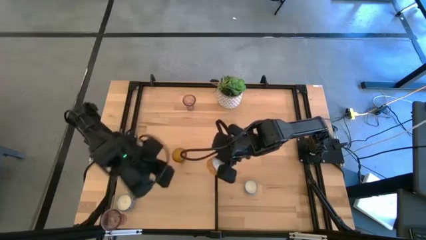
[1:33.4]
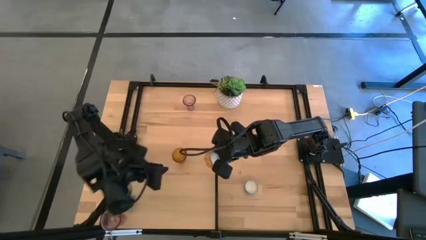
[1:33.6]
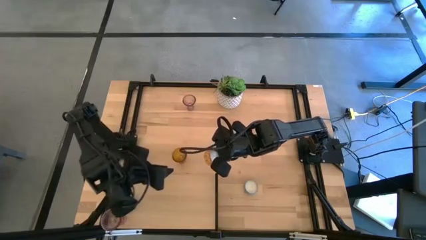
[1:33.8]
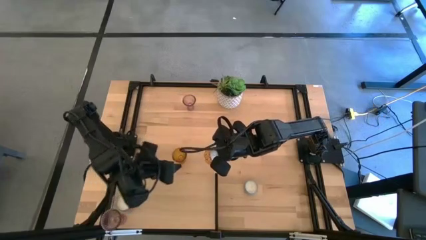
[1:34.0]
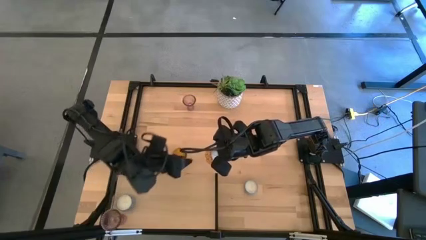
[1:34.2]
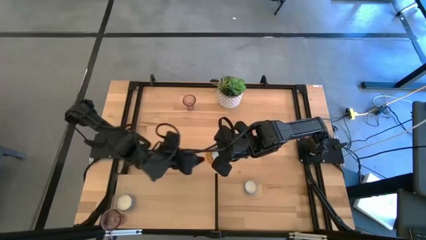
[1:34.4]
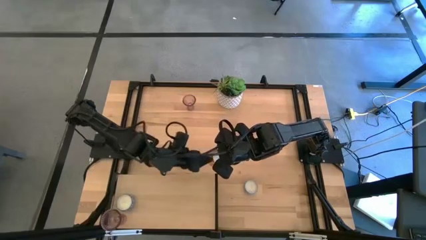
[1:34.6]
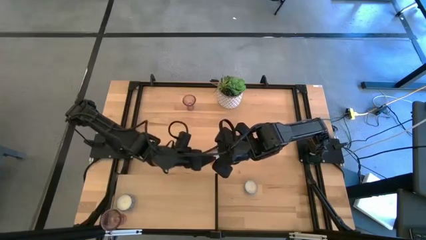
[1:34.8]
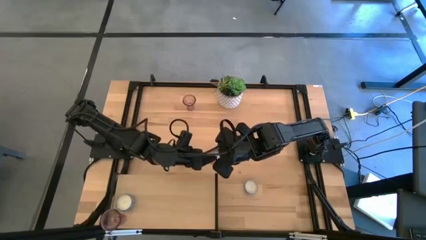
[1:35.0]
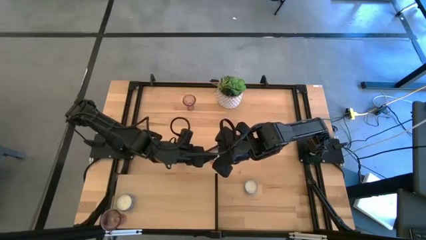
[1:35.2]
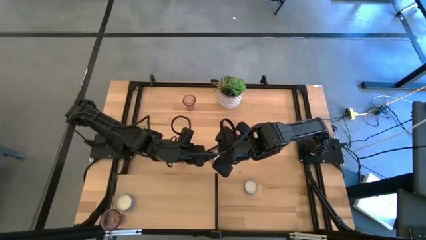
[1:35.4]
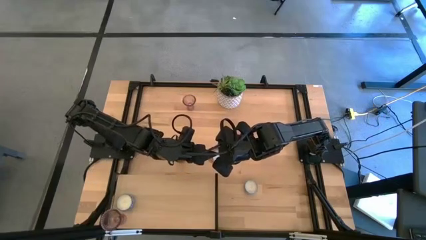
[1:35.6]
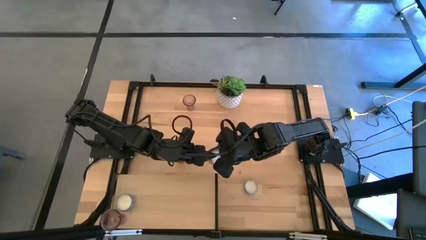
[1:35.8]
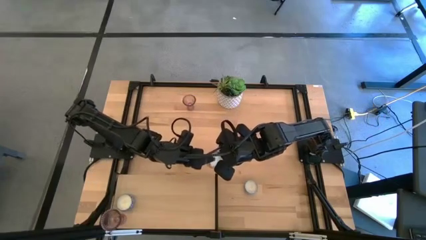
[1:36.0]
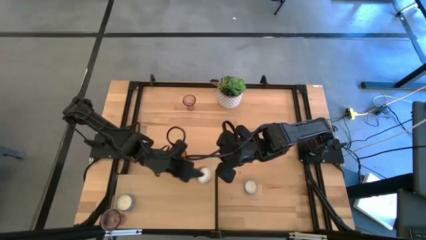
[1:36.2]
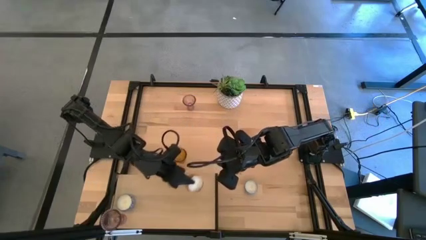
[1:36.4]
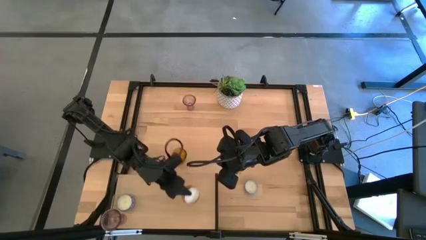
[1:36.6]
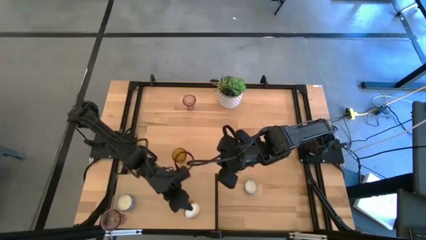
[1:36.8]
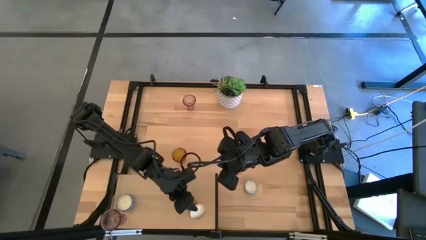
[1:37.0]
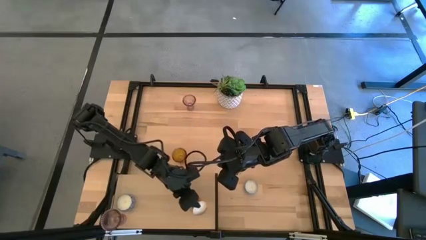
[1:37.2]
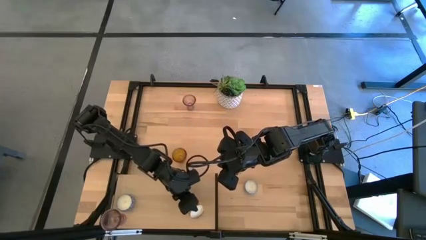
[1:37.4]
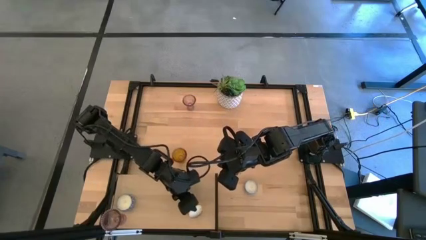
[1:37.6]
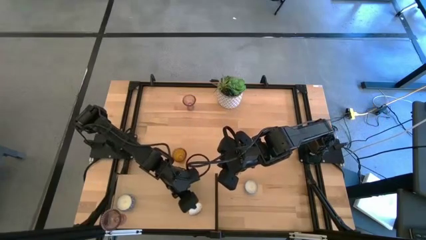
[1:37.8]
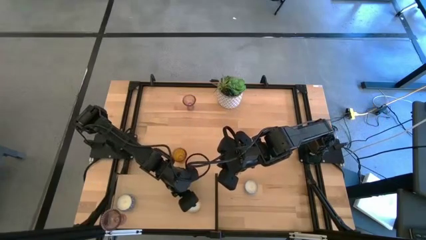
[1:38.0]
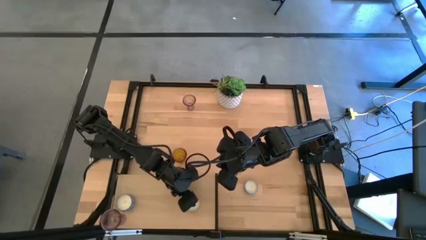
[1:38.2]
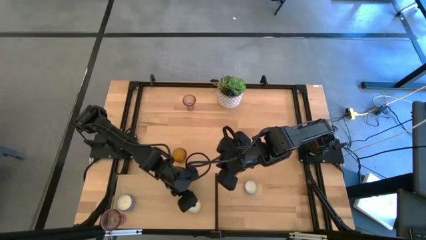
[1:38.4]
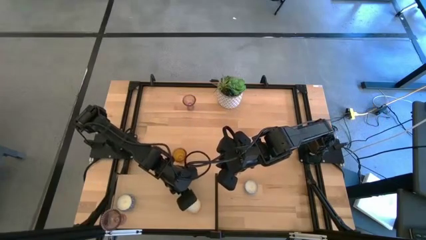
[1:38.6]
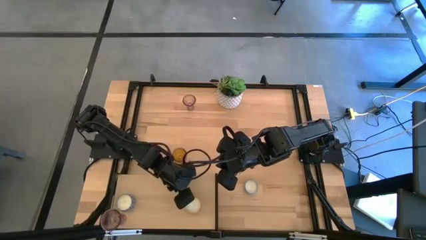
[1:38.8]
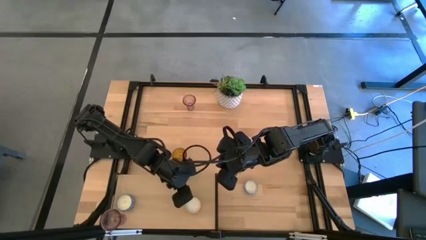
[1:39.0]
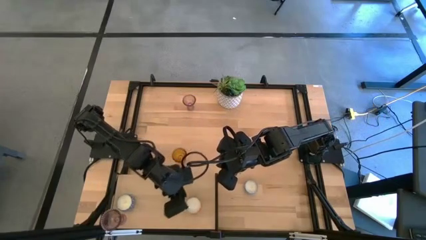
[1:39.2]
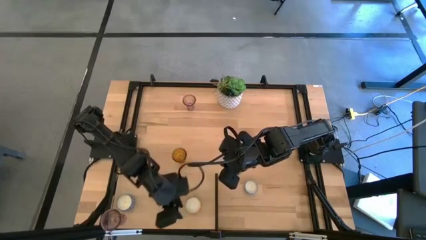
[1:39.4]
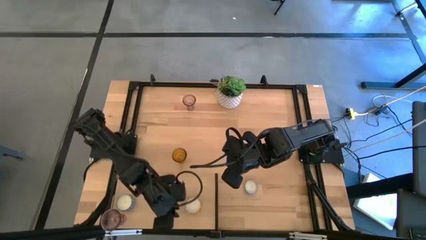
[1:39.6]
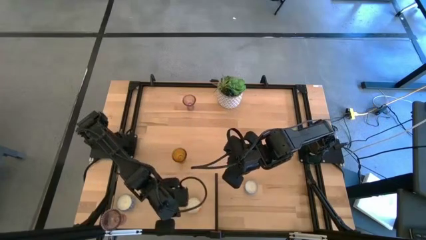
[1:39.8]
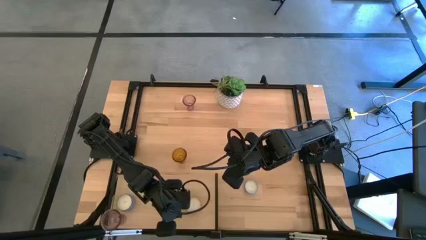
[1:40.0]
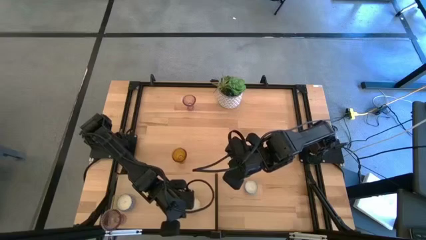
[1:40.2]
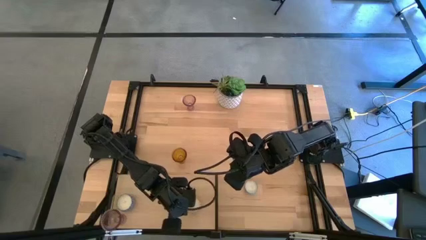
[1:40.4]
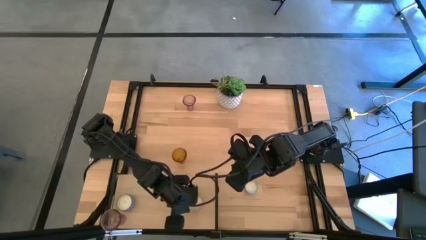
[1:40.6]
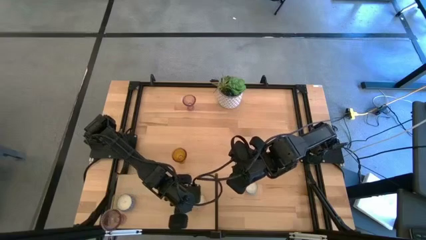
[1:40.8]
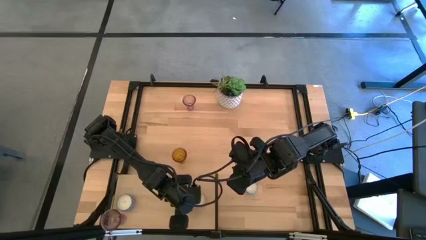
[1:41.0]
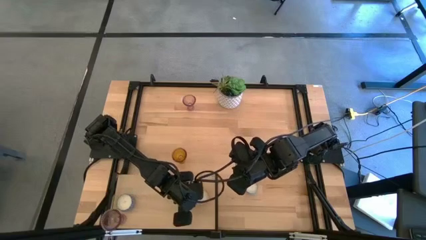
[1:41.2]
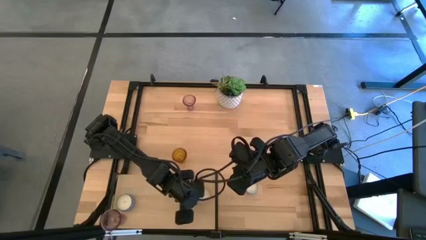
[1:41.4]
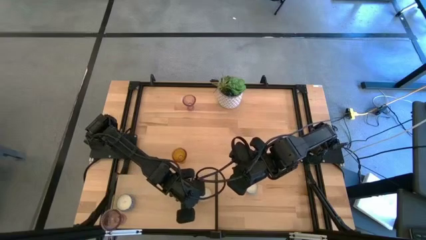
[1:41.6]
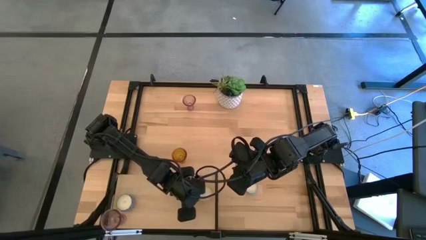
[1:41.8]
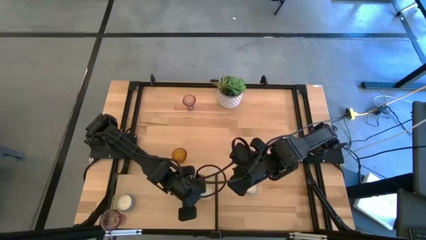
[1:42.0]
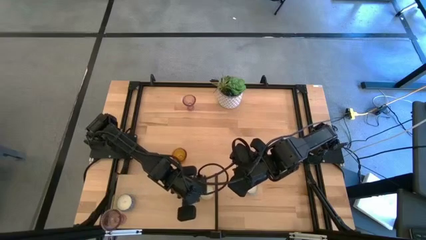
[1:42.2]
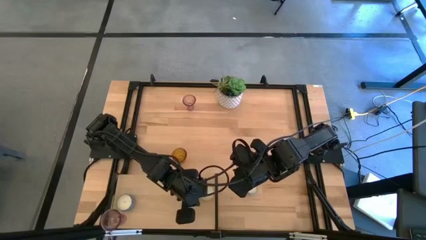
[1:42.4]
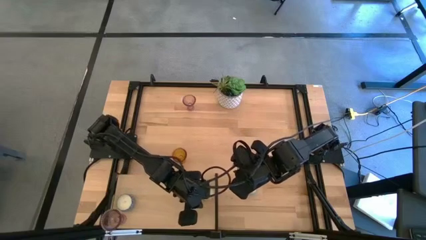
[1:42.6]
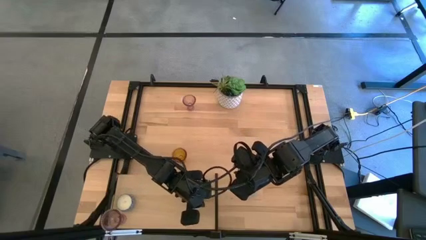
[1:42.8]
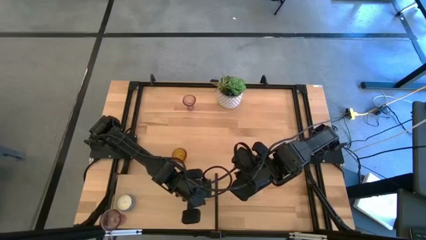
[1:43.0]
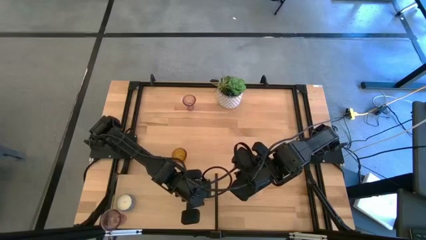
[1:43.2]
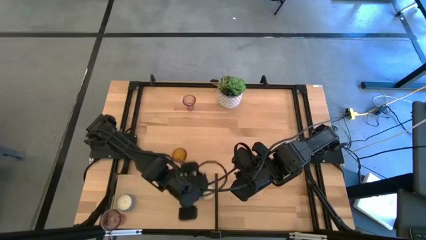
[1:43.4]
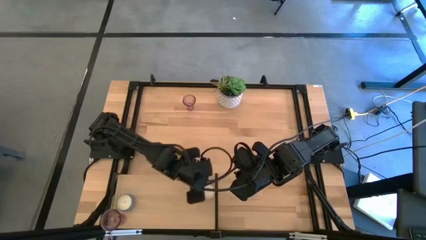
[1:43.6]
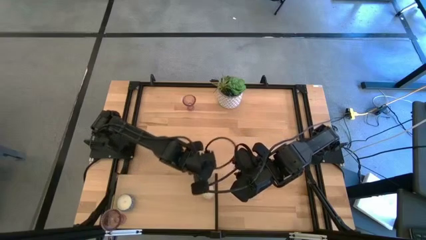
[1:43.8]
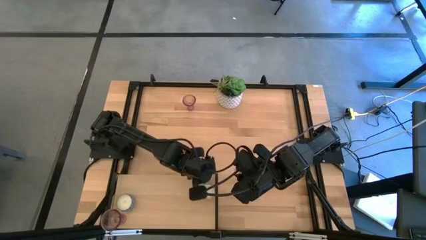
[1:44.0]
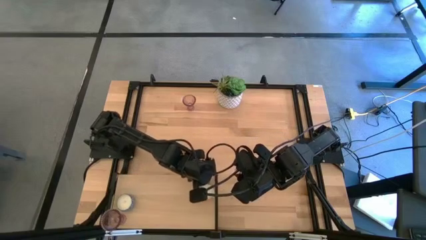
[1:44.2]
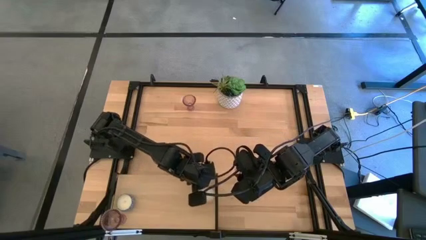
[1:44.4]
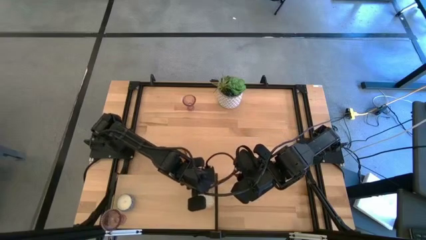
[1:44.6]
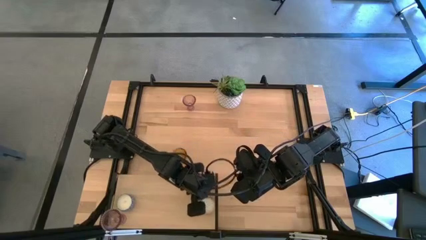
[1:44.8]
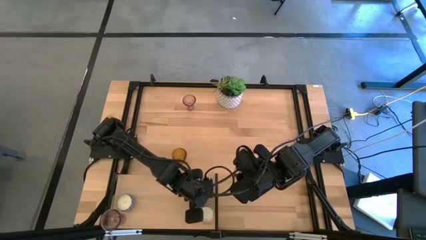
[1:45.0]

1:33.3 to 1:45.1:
Task: Pick & Place candle stick holders
Put the orange scented candle on the shelf

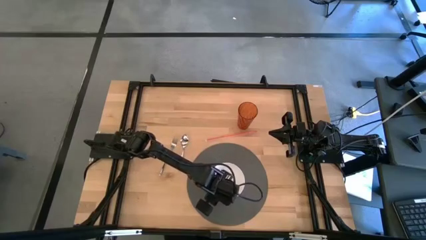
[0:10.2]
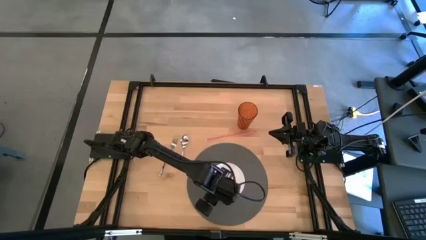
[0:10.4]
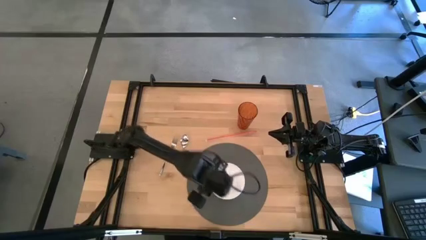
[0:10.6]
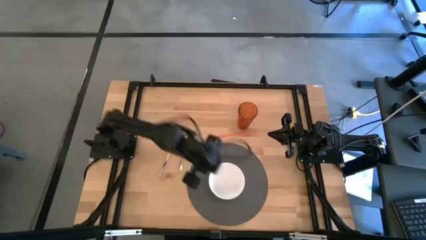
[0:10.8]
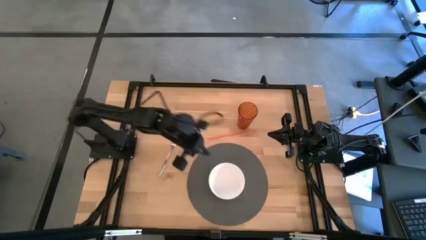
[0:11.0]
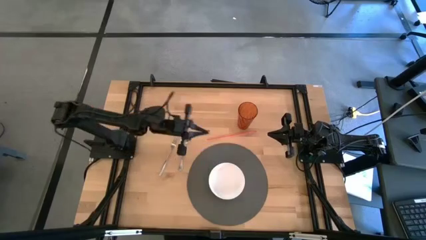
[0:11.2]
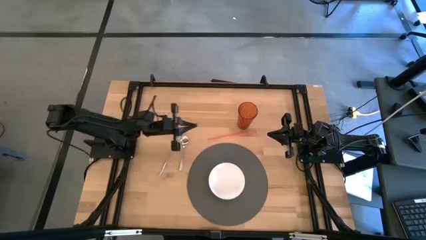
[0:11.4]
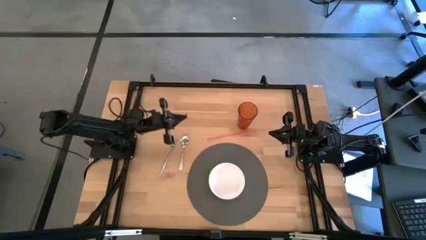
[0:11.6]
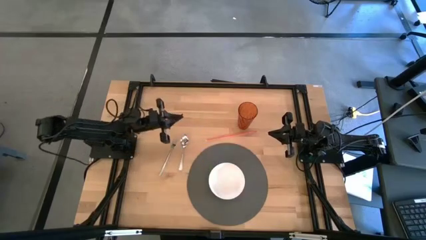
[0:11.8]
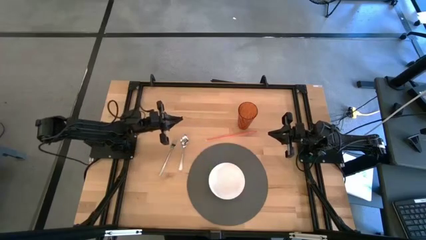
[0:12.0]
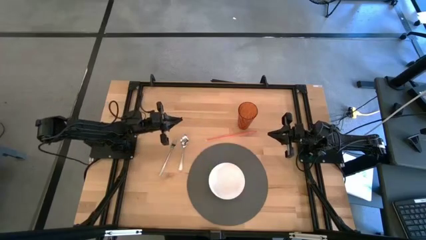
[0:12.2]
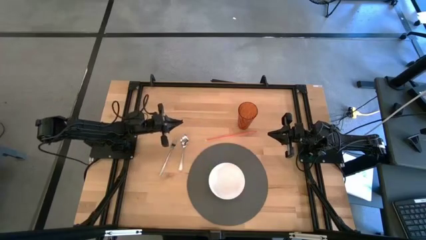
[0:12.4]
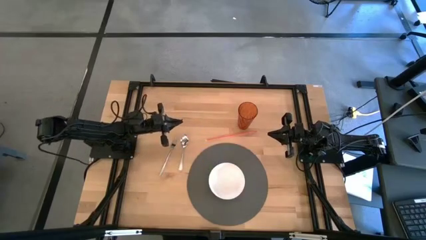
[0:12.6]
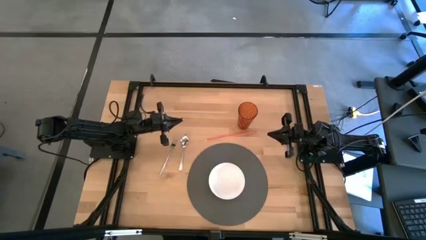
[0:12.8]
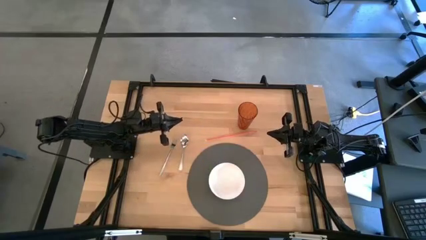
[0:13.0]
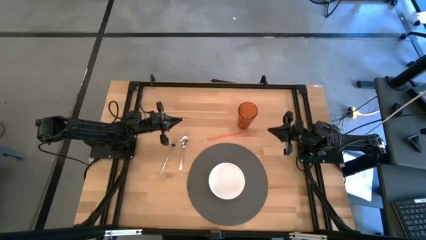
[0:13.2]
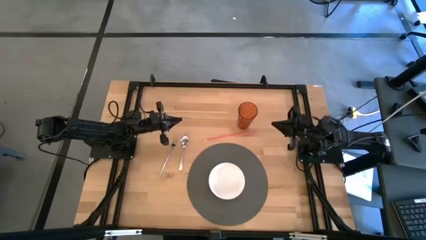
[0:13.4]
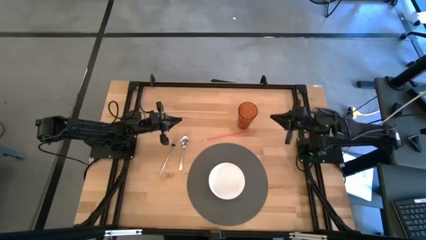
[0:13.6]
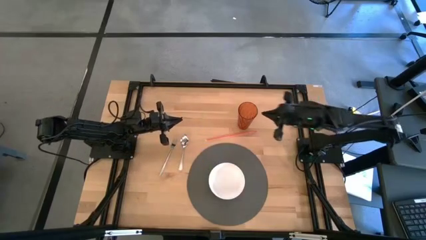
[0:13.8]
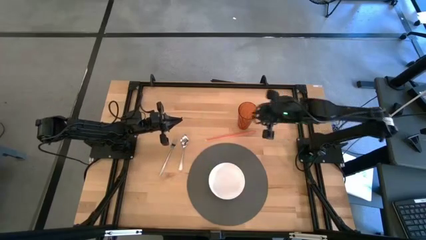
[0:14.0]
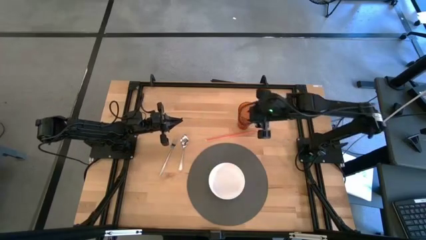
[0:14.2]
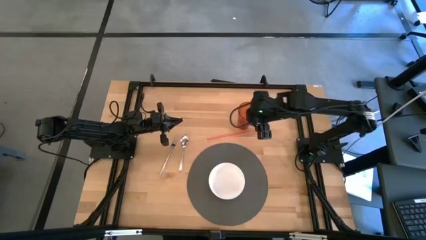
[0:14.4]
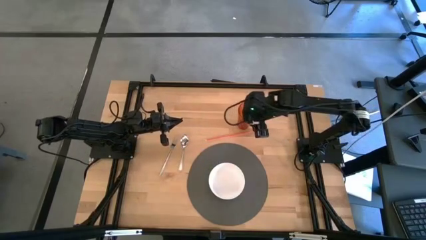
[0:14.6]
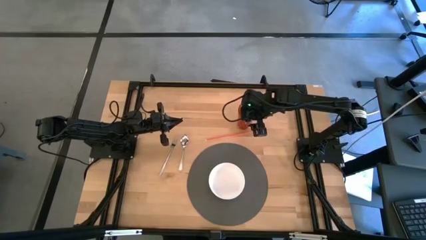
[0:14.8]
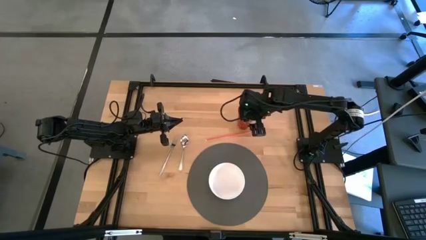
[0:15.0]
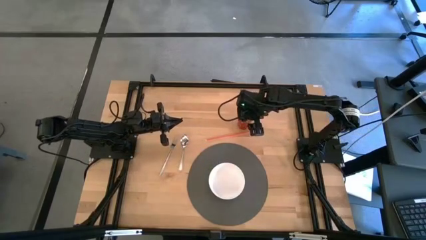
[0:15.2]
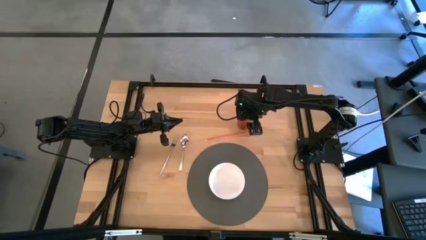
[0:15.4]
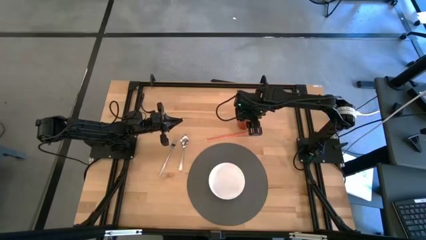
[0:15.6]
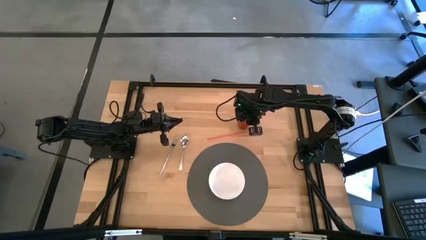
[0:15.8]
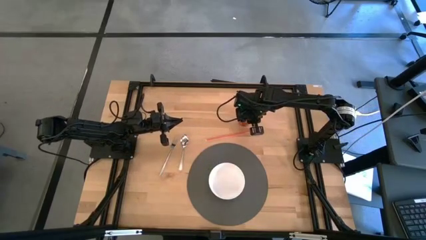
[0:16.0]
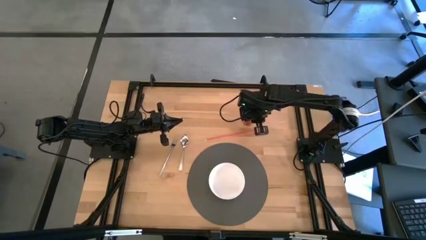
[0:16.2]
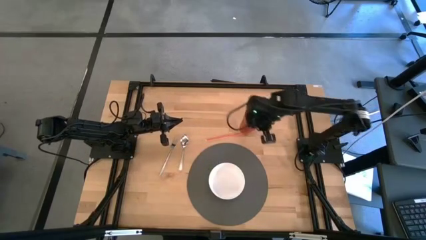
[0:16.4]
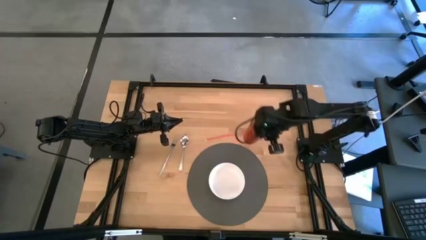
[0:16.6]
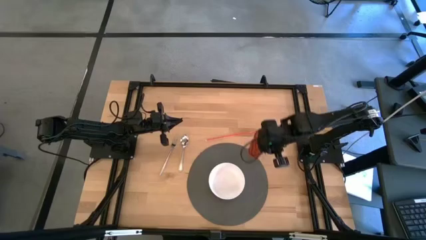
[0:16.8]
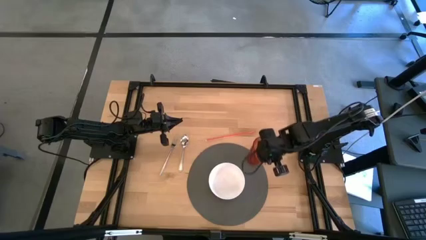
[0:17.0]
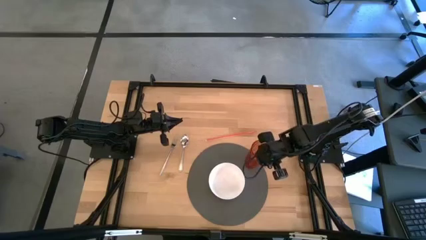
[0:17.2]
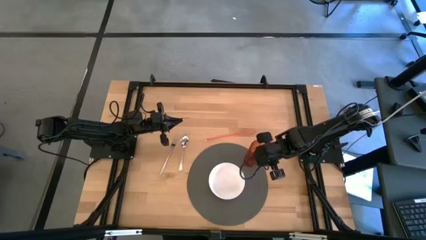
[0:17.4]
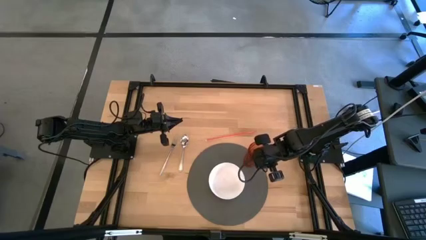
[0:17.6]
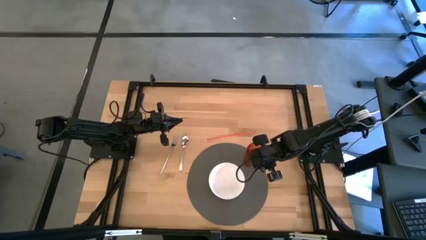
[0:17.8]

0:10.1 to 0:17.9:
Task: Pick & Place Utensil
Put the glass to the top right of the bowl on the table mat
